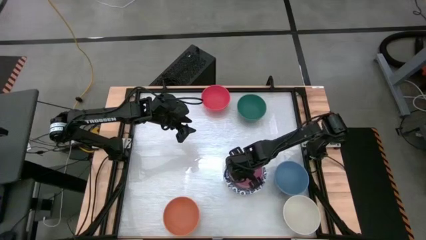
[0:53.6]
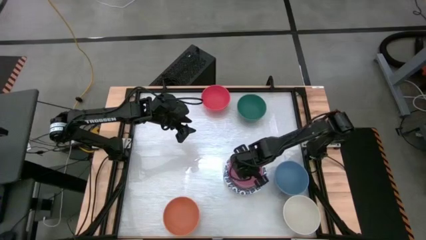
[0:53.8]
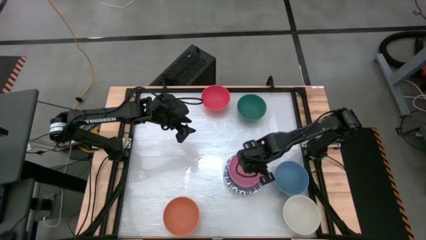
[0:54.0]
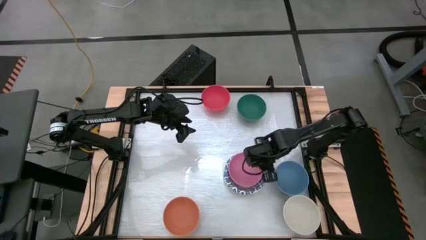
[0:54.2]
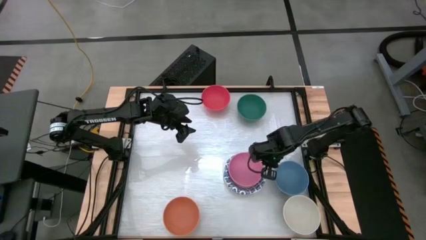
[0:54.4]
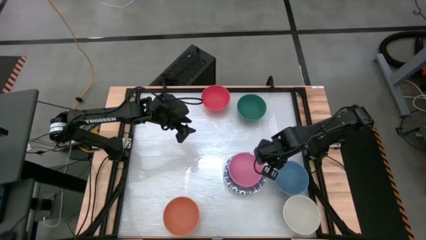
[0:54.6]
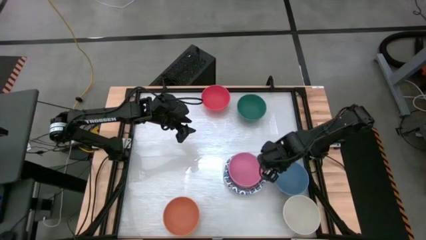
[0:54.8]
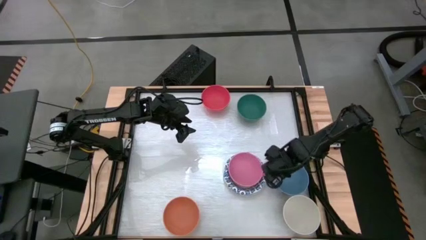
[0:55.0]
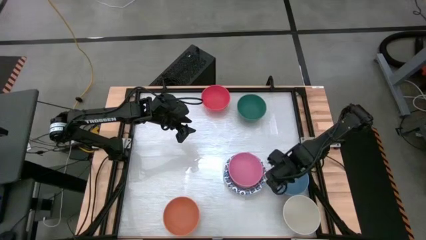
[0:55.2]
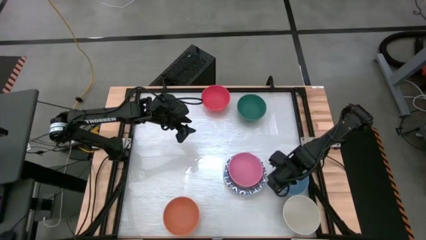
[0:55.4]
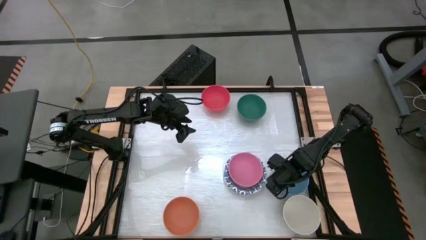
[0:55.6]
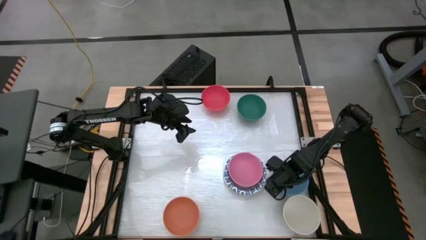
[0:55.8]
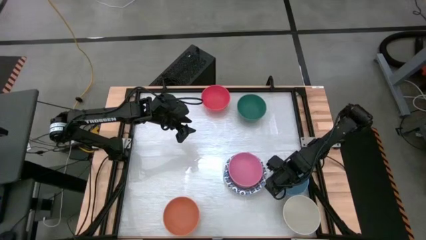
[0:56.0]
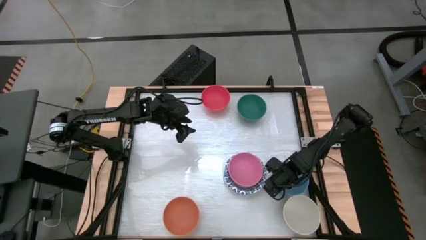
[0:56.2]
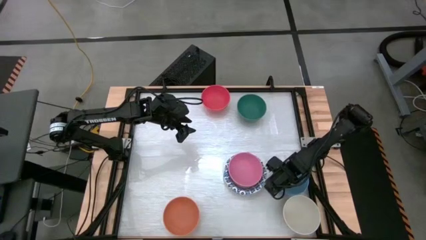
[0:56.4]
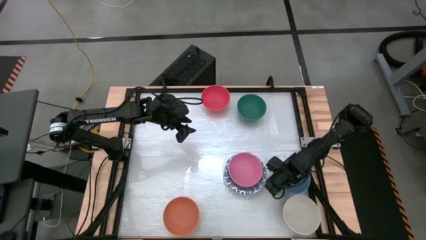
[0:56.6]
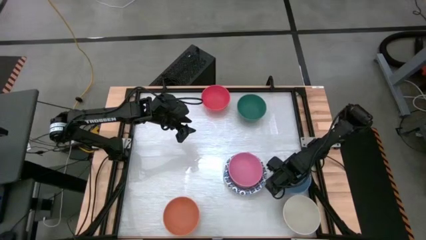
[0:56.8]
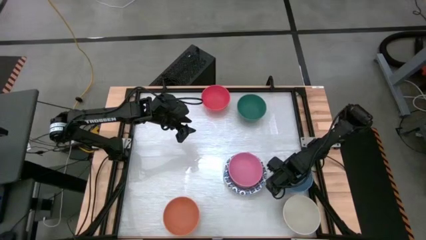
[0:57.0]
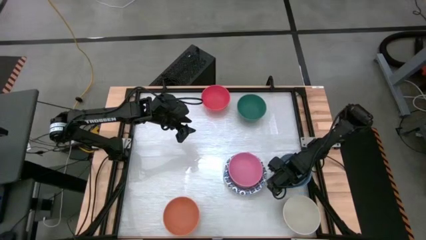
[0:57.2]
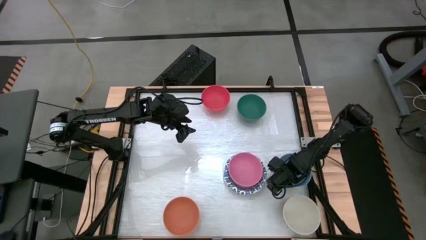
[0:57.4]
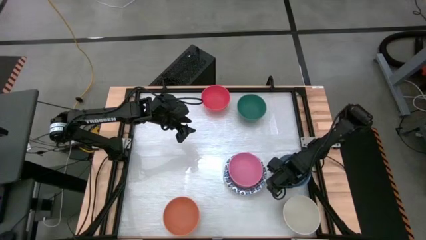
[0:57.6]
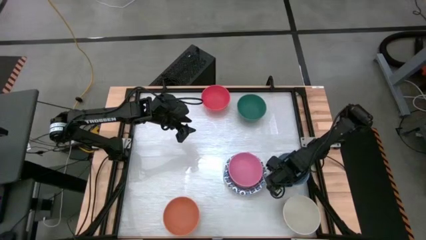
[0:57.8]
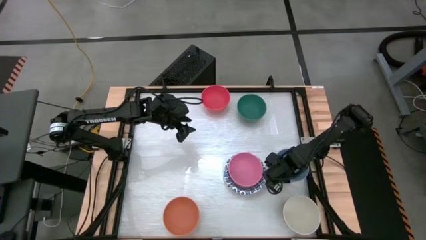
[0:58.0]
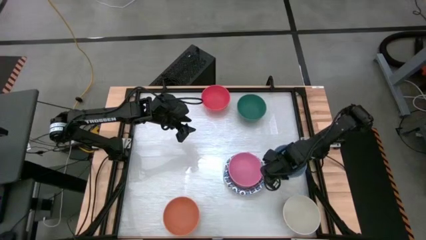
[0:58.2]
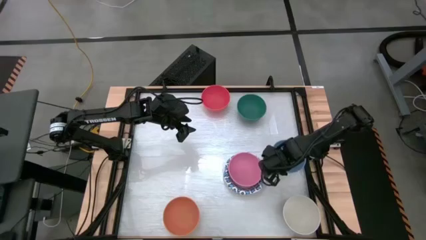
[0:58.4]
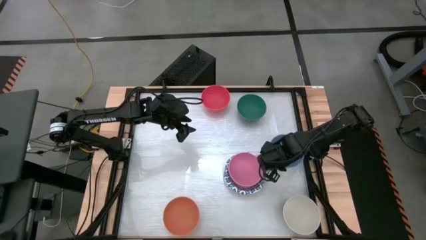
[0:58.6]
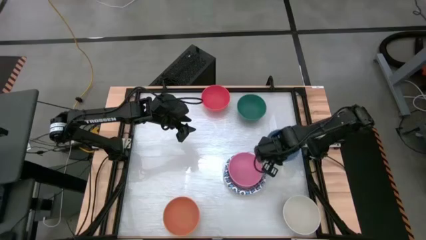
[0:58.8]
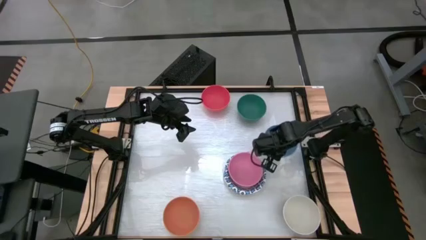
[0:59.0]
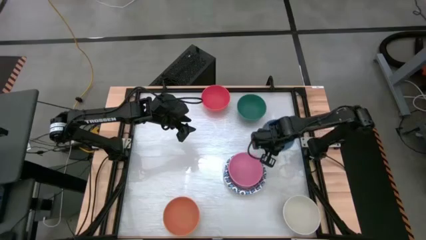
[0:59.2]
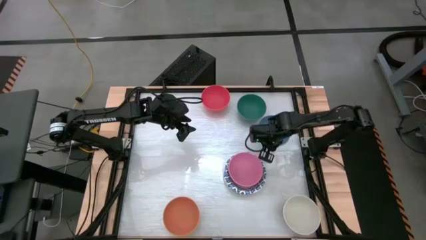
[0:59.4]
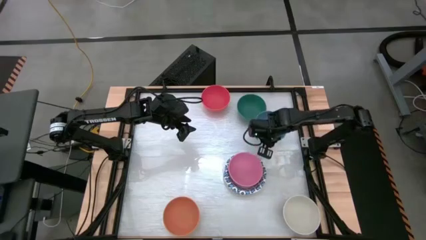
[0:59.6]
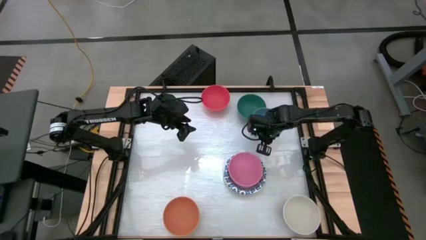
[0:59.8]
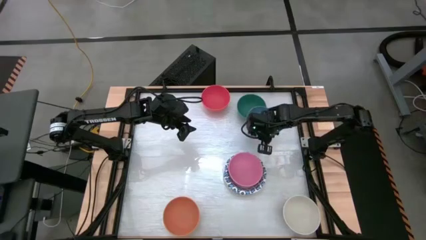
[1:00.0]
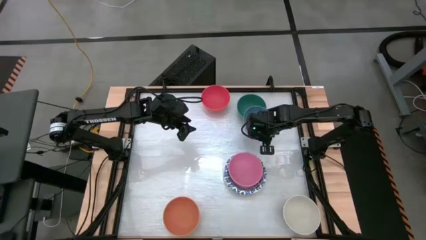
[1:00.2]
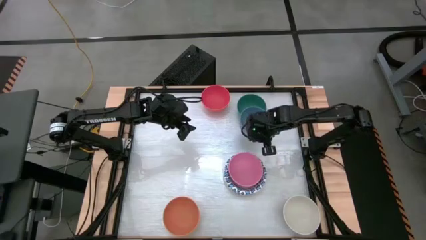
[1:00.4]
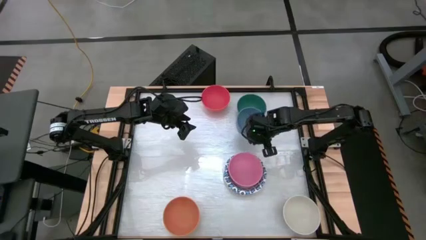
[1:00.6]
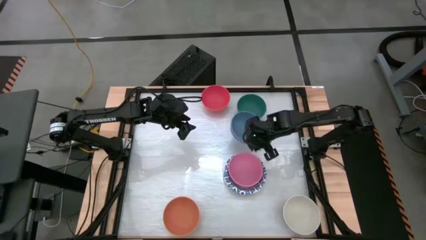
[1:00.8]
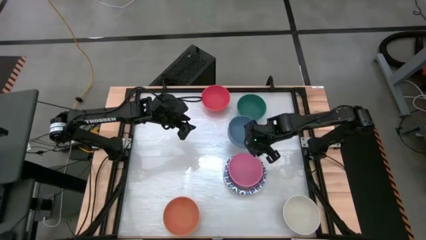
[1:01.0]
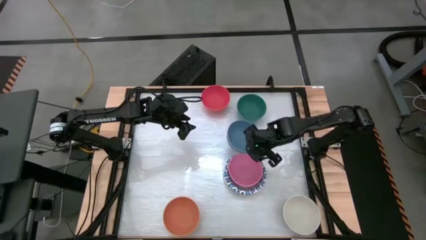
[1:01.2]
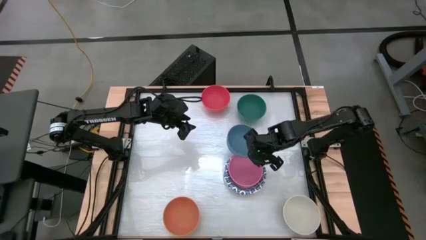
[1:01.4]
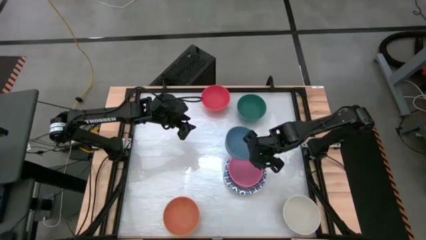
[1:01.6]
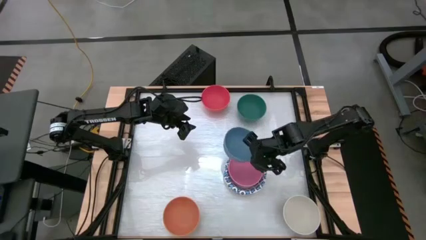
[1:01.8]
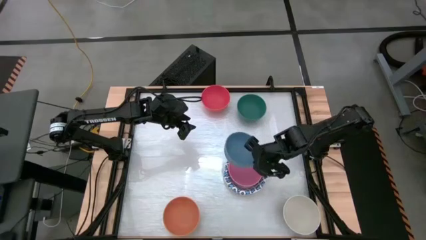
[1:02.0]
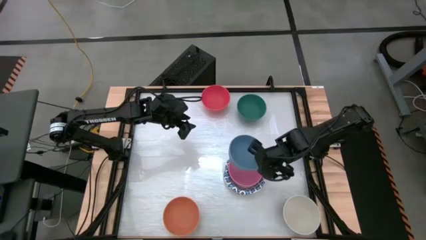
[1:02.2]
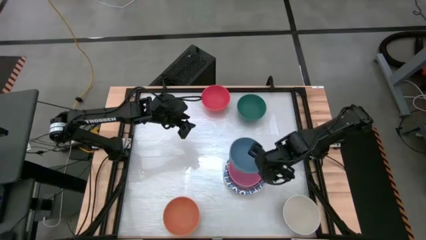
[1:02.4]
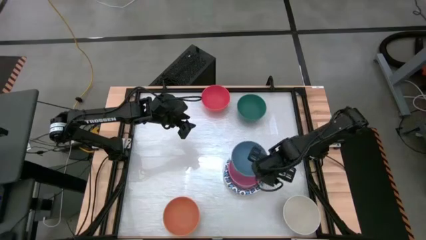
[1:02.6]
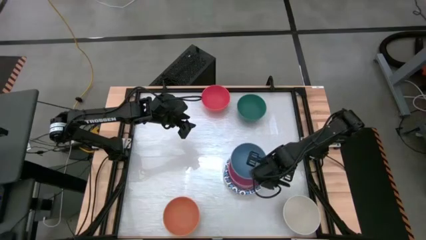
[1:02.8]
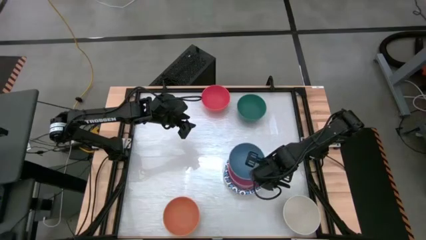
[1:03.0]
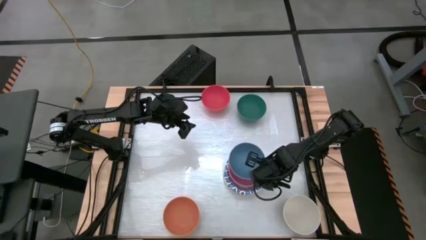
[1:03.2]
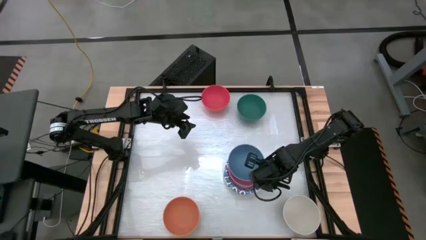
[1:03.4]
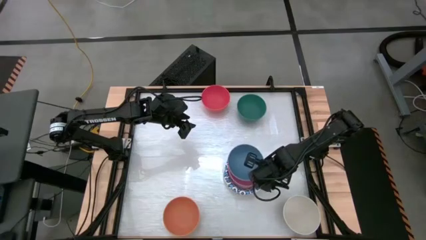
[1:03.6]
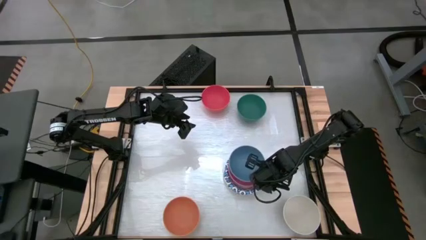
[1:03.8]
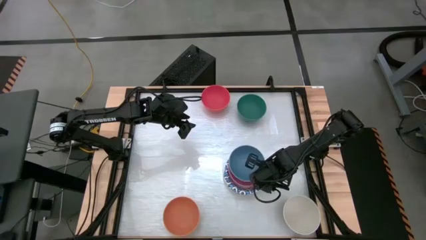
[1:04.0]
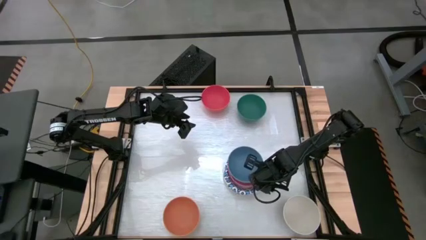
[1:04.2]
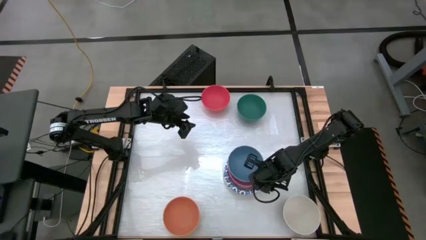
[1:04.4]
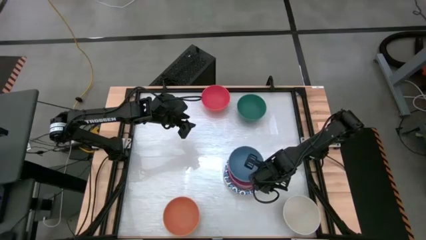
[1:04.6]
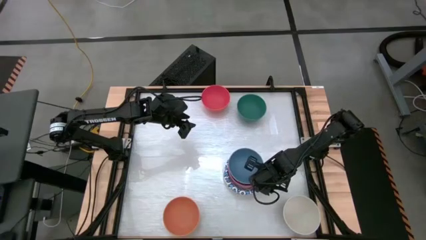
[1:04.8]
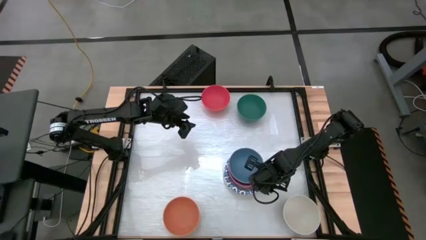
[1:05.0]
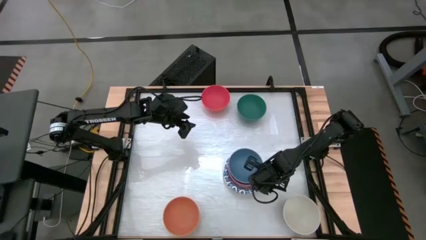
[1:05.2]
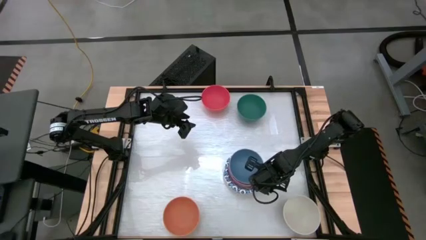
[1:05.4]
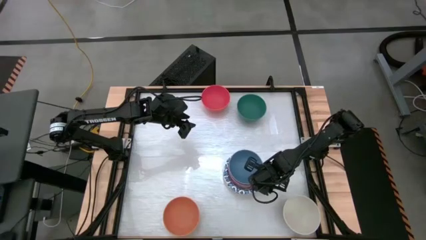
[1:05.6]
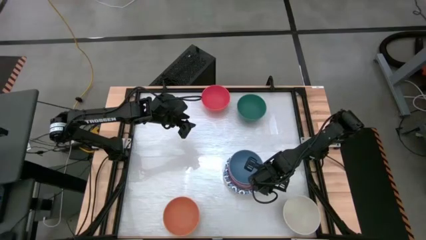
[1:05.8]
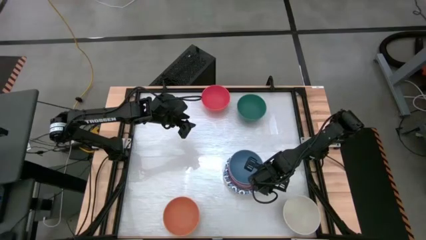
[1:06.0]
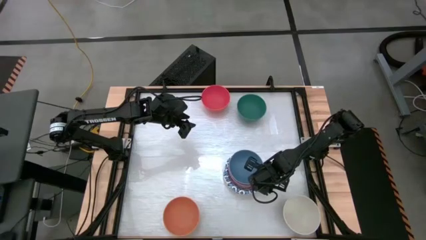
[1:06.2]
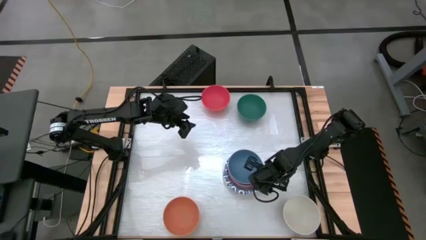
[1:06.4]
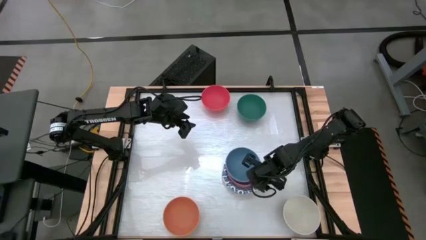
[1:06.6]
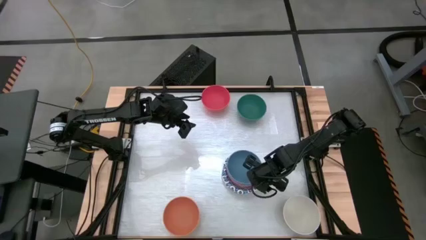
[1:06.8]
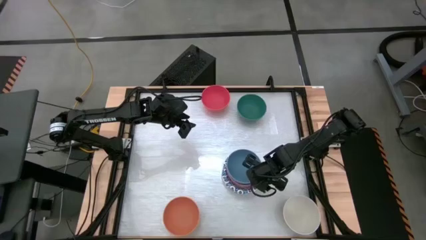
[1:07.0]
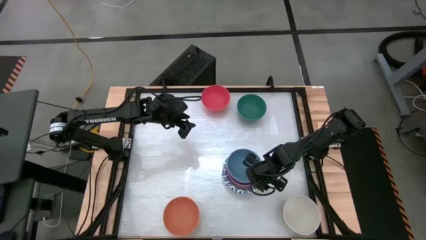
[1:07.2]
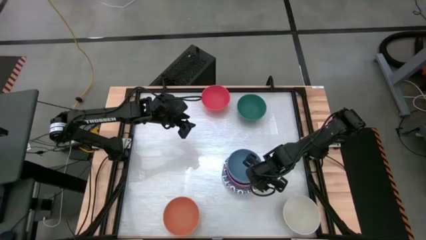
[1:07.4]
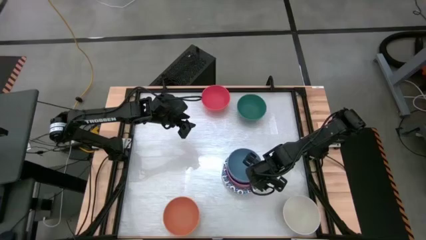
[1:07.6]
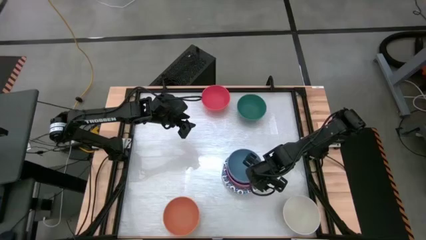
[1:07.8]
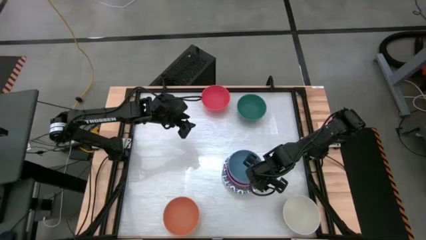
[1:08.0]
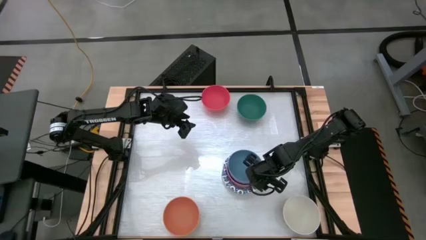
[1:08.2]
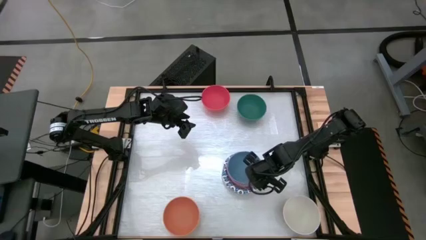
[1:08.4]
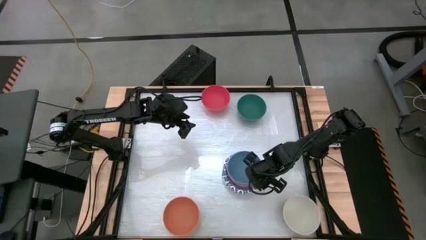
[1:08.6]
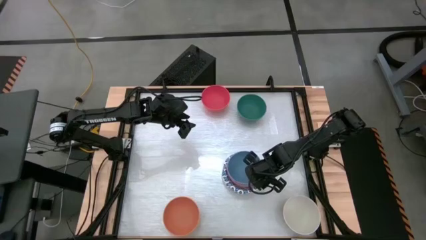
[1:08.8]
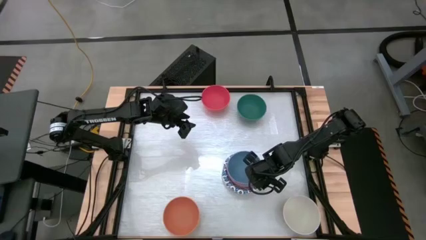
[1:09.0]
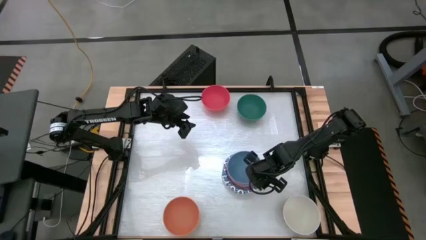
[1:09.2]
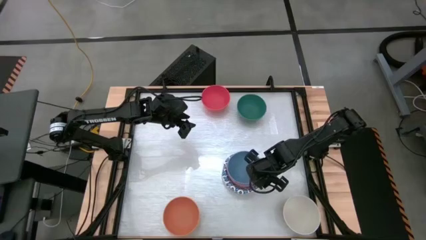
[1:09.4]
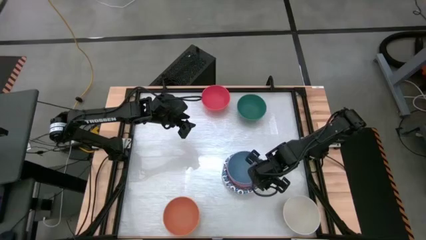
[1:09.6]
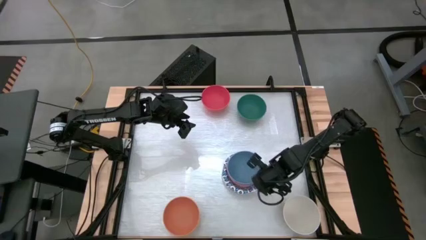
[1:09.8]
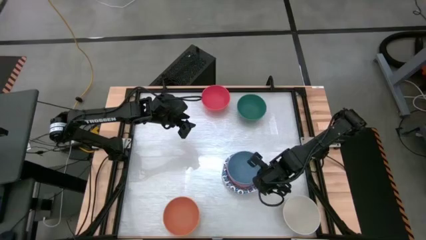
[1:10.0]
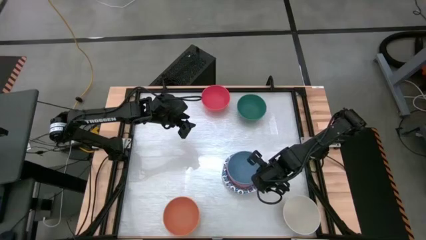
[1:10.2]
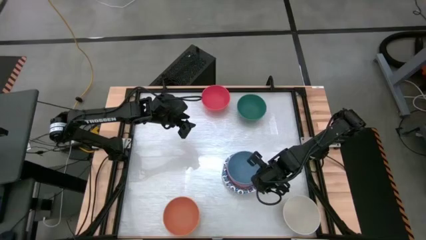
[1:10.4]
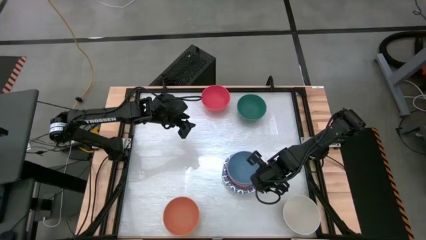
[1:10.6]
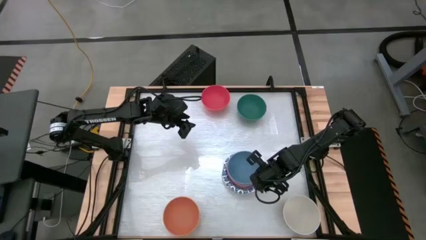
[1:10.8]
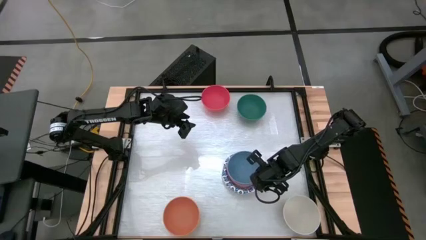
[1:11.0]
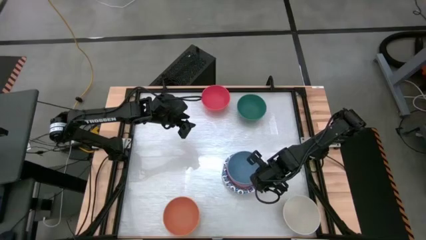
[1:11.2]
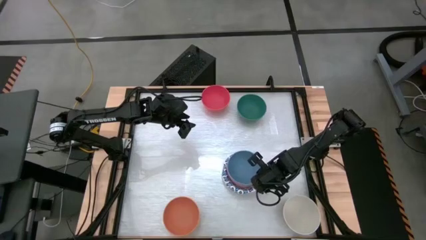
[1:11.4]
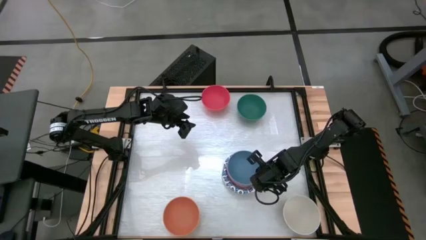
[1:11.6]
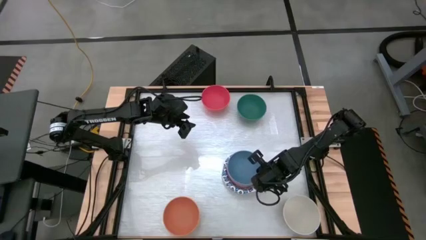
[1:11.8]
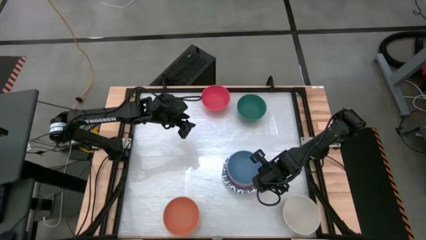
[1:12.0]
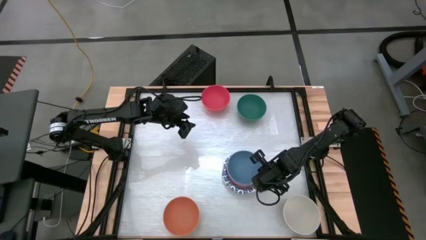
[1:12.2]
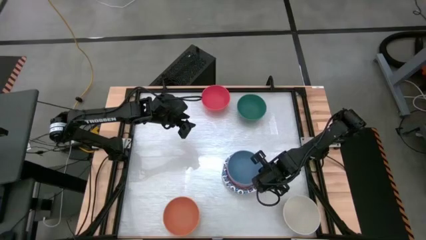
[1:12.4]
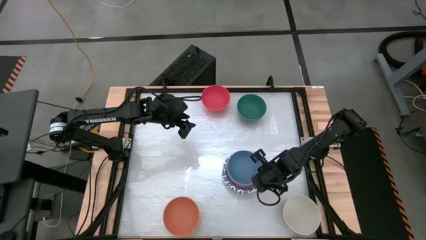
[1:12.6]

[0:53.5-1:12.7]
Task: Nest bowls inside each other by size order
Stack the blue bowl into the pink bowl
